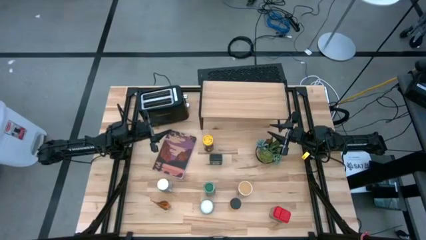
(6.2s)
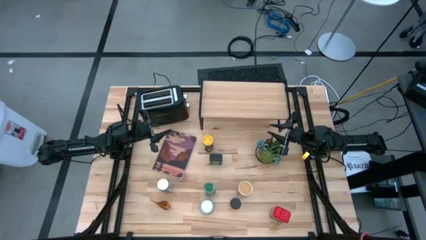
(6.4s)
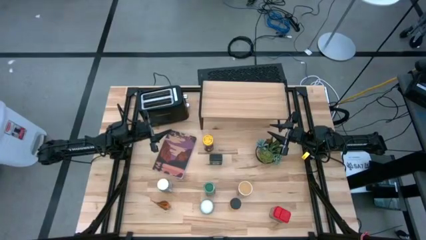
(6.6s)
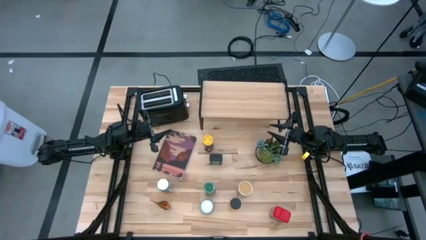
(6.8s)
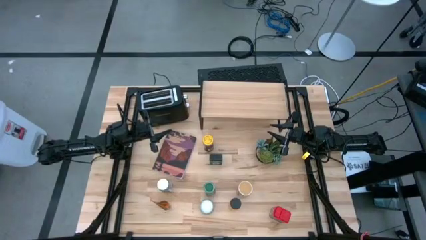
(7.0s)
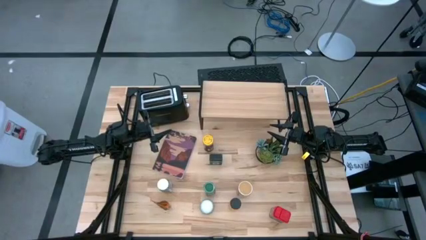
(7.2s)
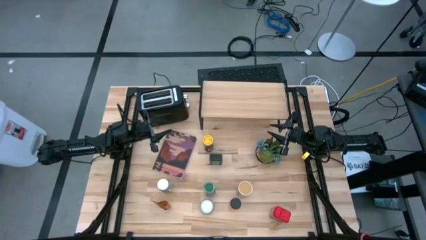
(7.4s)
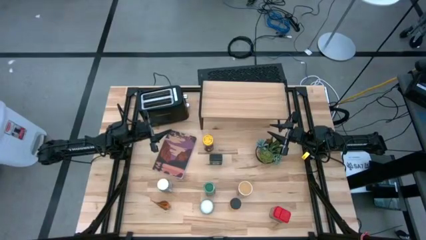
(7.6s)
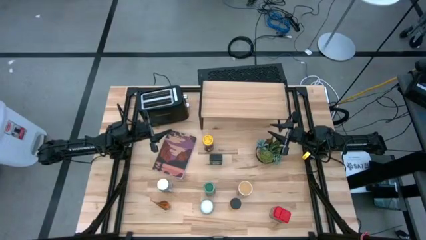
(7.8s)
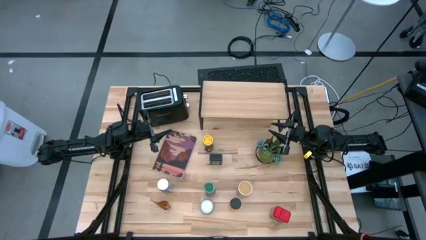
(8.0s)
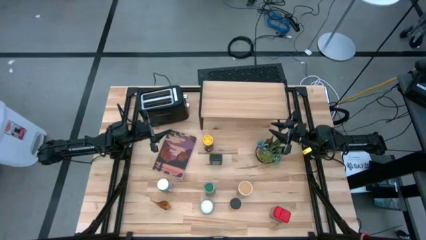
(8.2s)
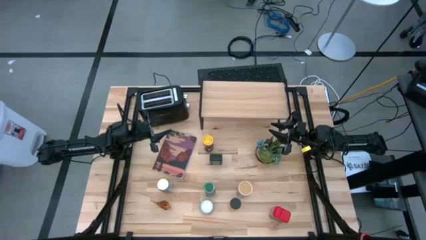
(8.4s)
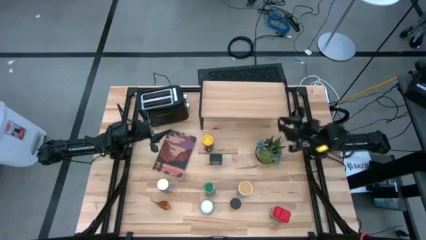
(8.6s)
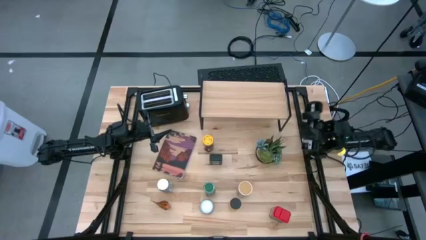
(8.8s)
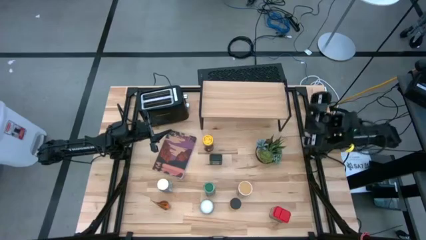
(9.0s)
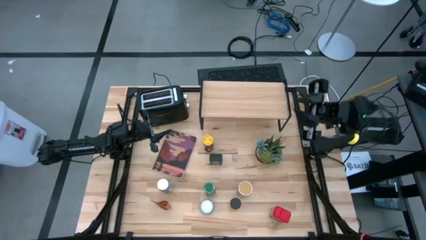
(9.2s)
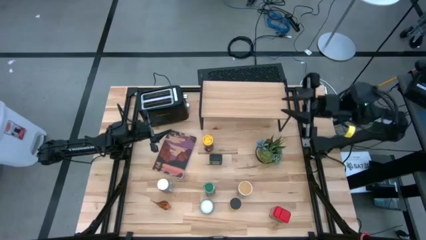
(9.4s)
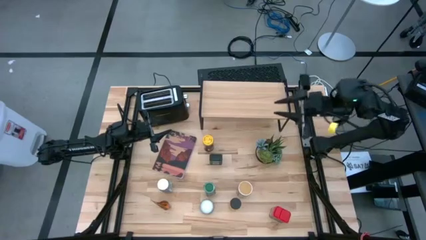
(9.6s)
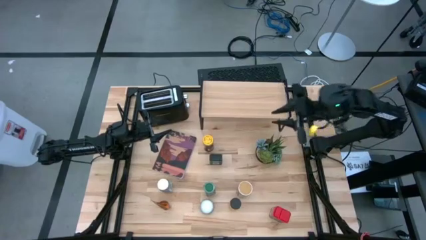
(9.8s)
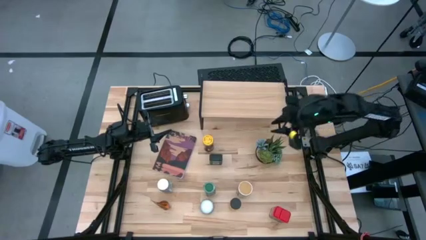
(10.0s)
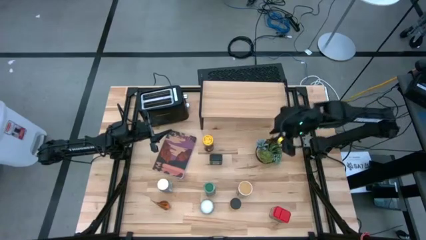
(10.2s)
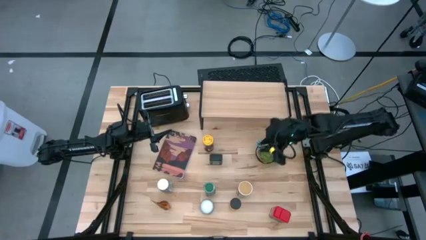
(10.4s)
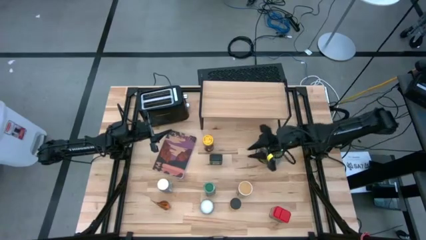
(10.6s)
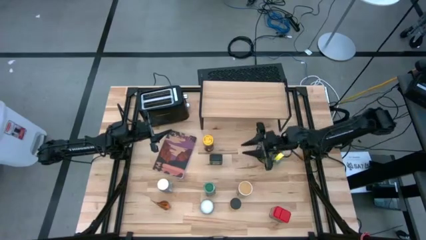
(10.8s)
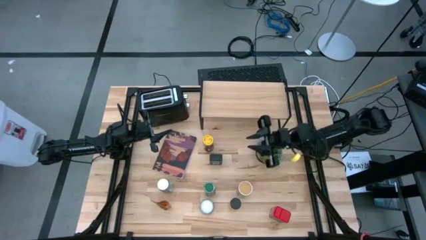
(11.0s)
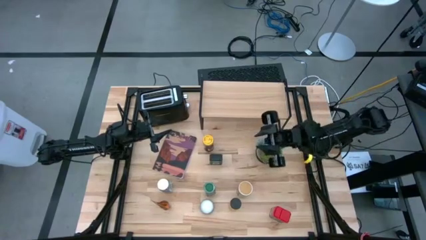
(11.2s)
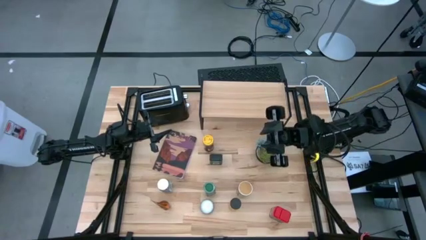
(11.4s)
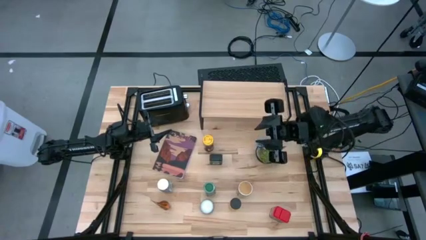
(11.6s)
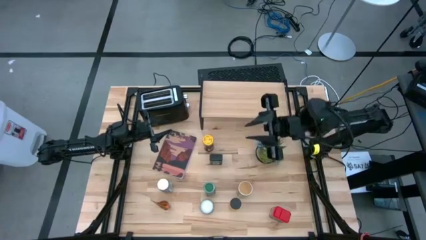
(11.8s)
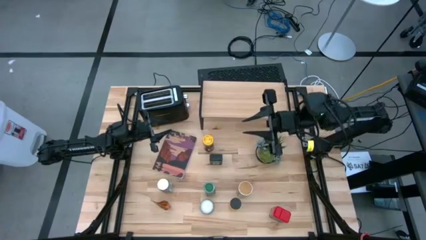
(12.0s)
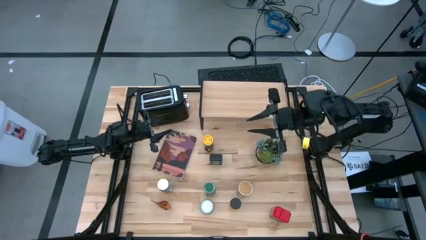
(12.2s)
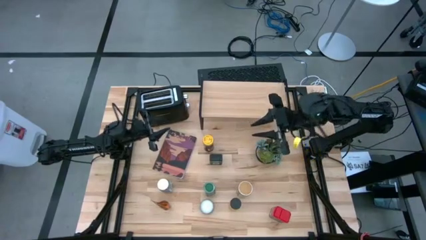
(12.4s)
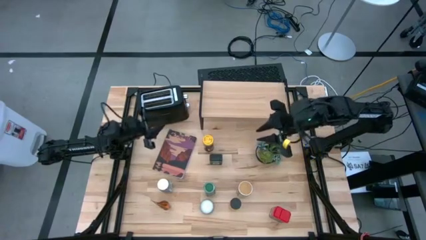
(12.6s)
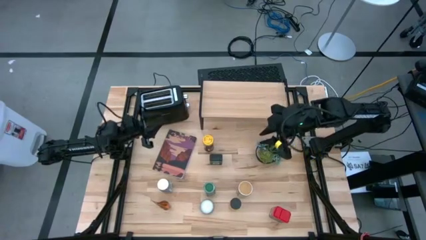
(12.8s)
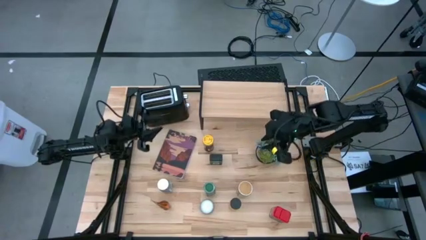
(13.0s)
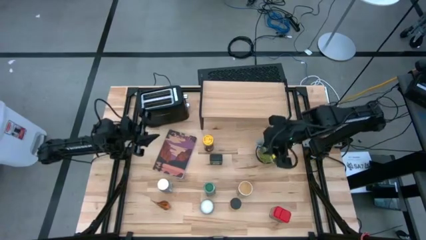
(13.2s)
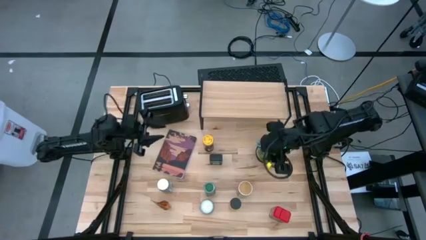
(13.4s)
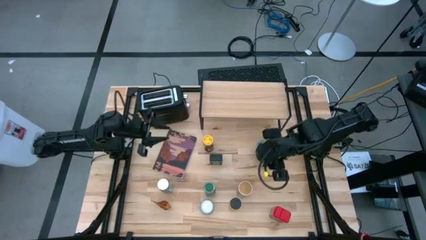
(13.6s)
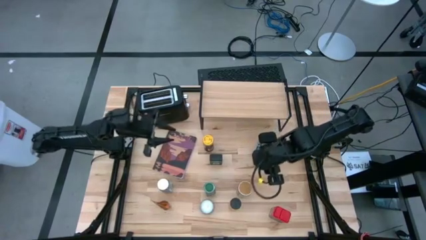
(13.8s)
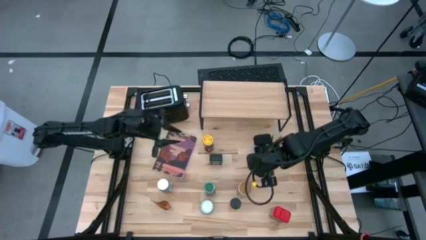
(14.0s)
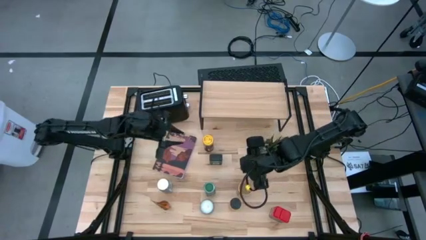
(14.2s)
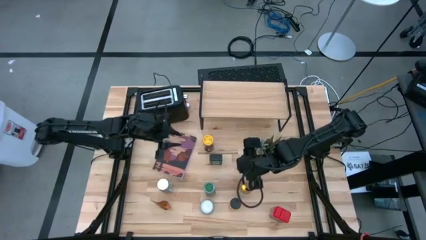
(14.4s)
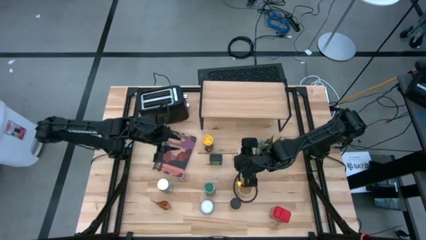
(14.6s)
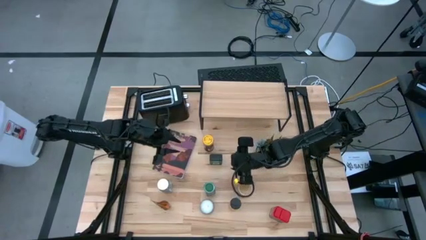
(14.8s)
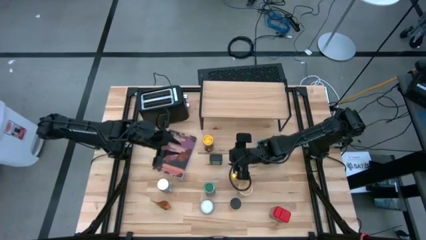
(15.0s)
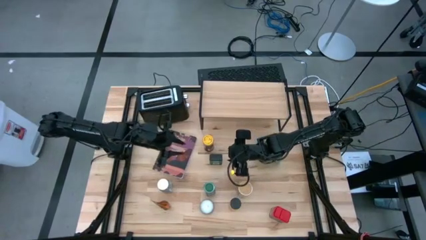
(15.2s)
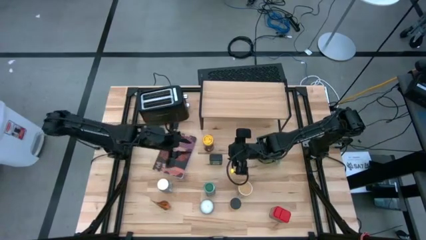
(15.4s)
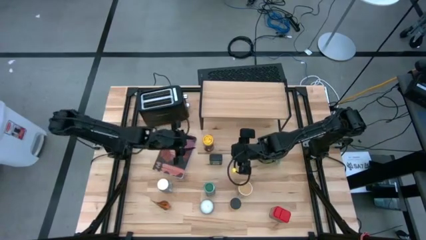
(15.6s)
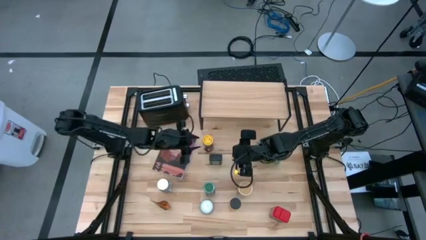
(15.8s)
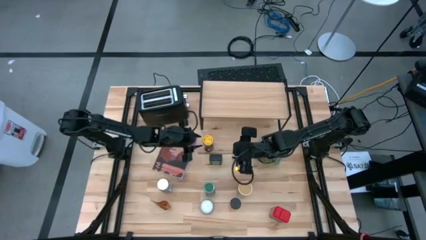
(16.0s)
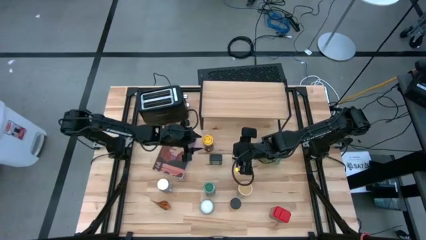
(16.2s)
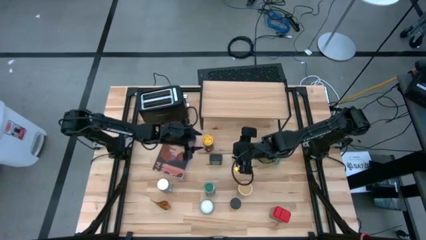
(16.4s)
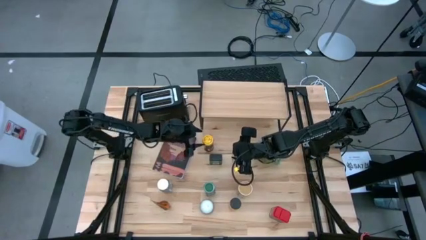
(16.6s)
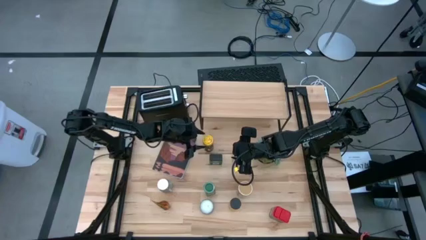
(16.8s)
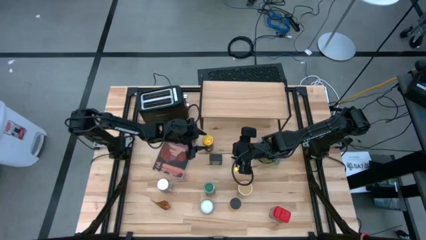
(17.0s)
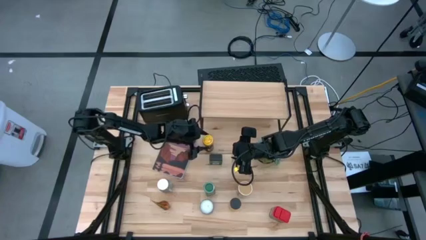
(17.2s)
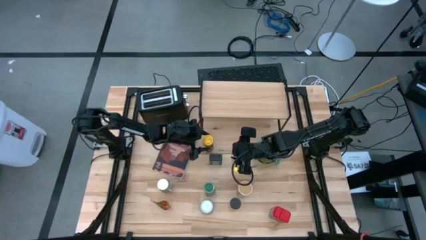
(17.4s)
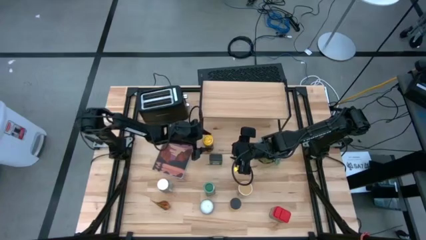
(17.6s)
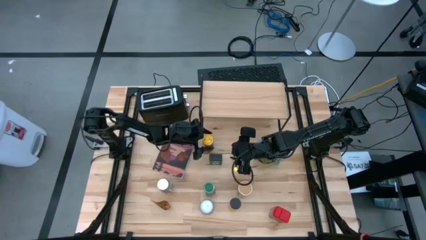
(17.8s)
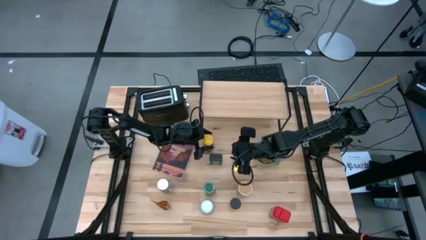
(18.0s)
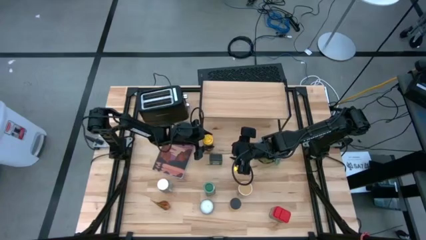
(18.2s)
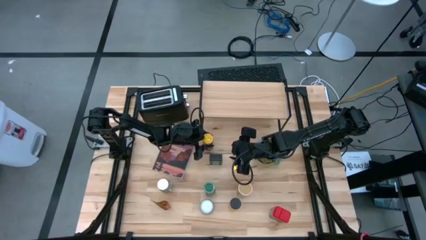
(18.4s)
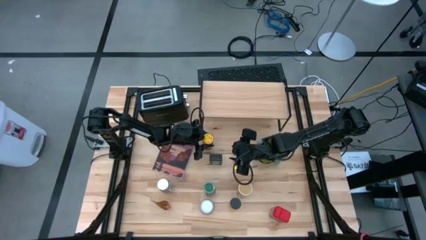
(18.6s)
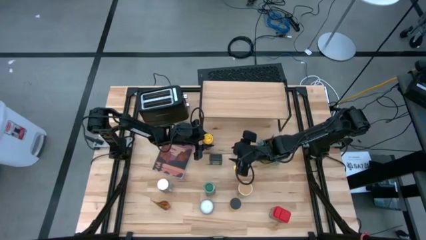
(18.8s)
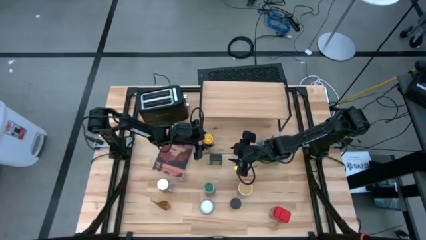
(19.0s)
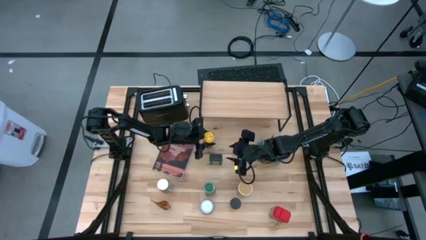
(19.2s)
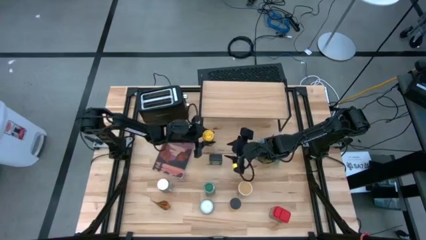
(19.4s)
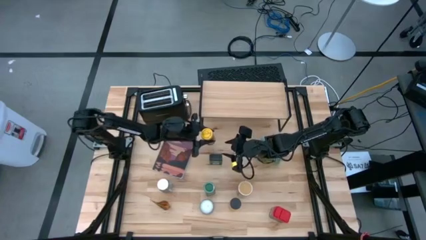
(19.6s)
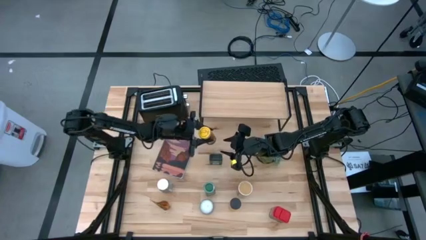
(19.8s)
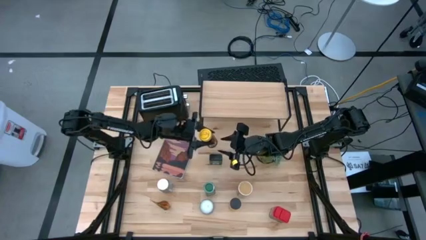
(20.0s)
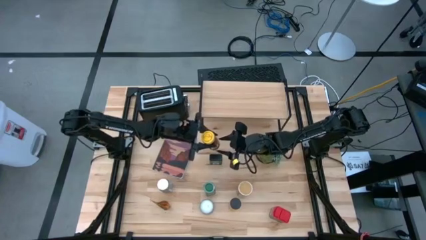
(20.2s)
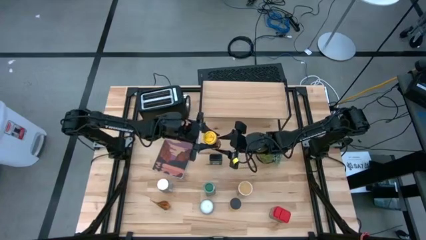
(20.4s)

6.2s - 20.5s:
Task: Shelf spices
Put the yellow seasoning bottle on the shelf
